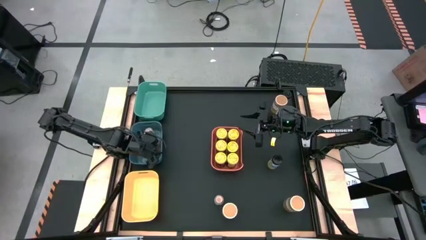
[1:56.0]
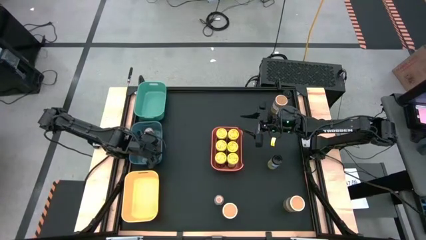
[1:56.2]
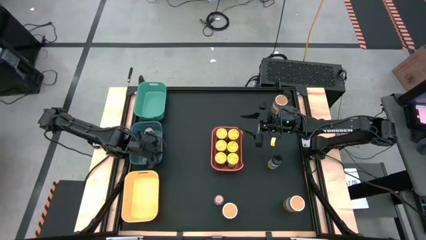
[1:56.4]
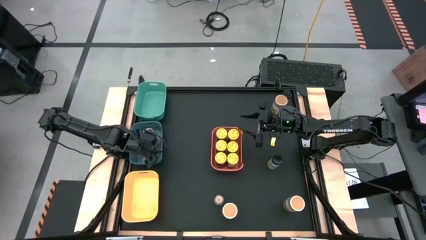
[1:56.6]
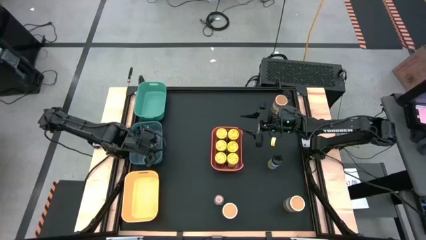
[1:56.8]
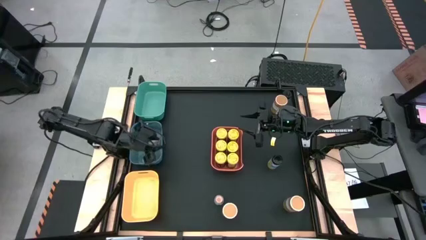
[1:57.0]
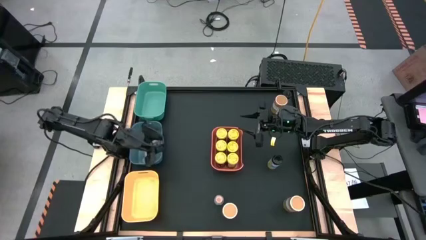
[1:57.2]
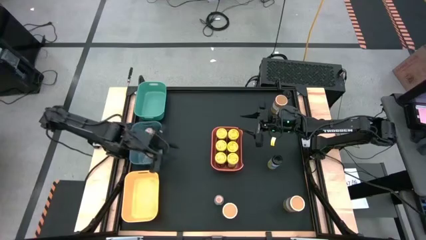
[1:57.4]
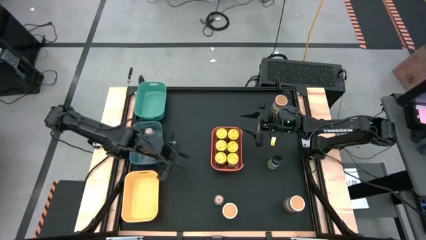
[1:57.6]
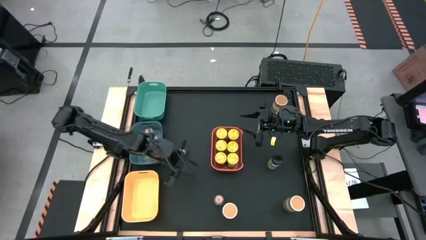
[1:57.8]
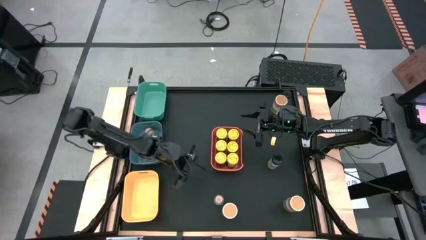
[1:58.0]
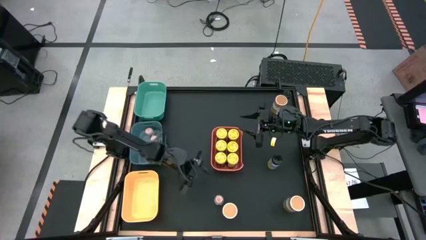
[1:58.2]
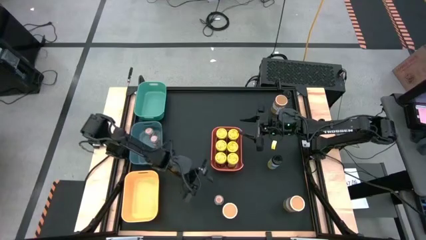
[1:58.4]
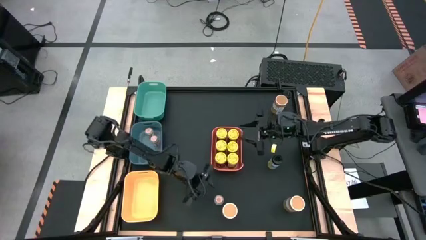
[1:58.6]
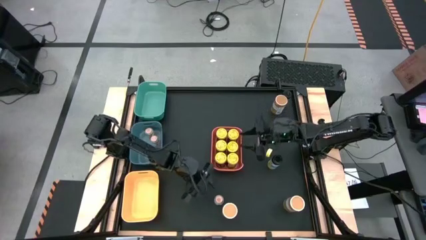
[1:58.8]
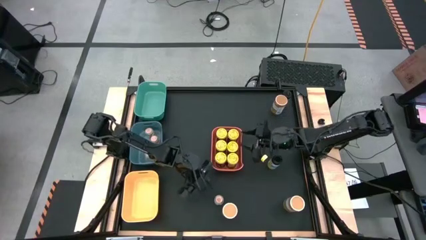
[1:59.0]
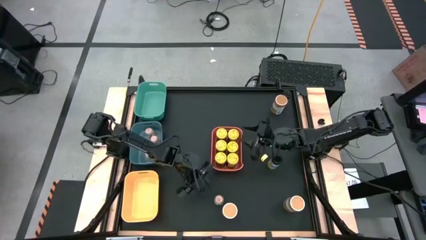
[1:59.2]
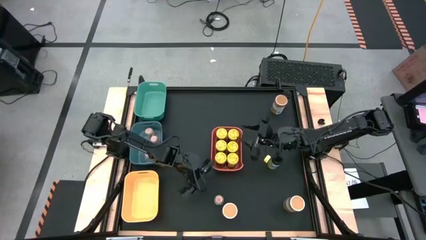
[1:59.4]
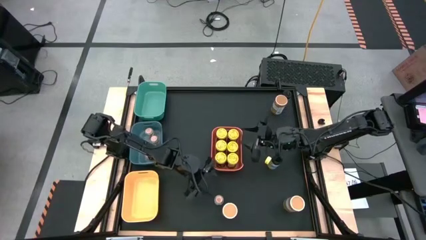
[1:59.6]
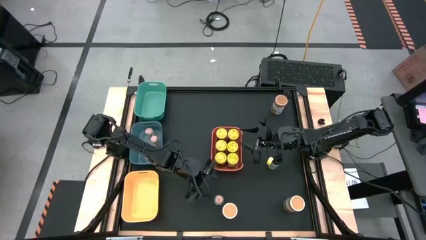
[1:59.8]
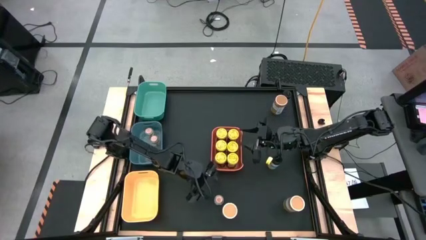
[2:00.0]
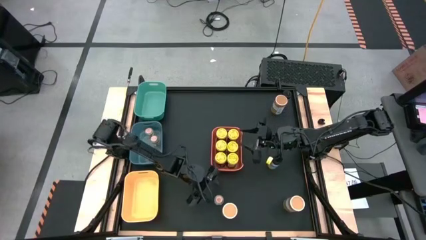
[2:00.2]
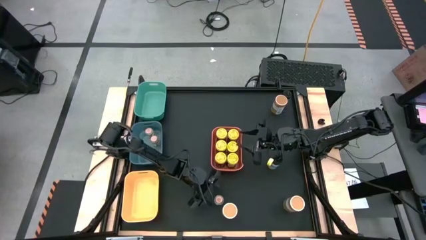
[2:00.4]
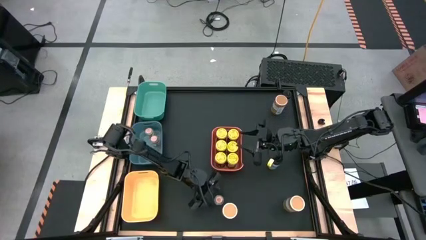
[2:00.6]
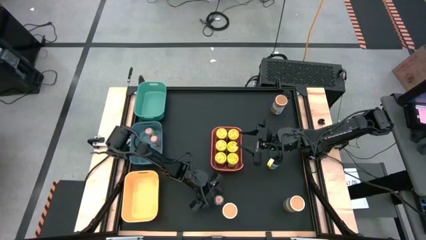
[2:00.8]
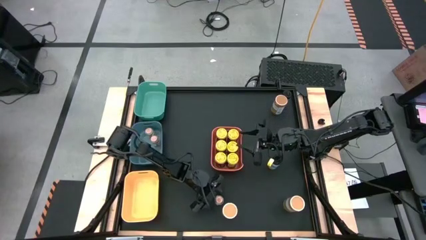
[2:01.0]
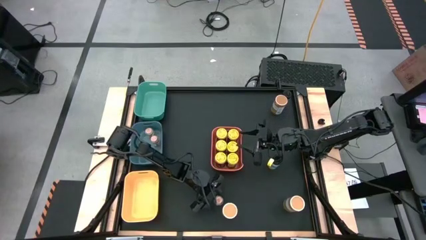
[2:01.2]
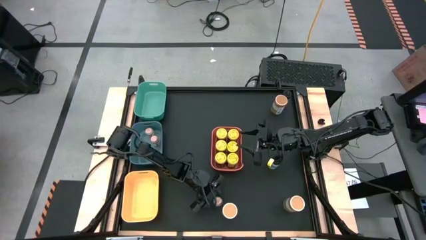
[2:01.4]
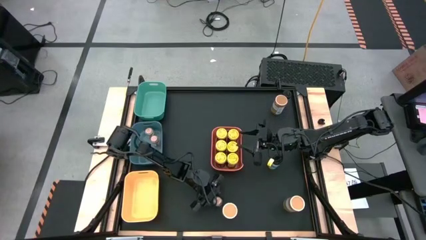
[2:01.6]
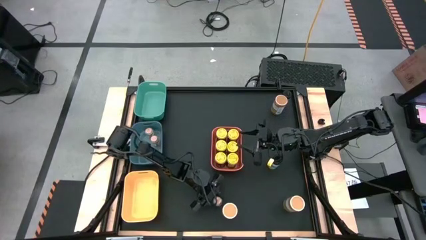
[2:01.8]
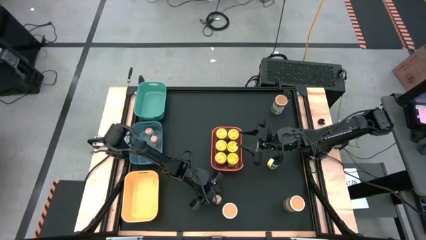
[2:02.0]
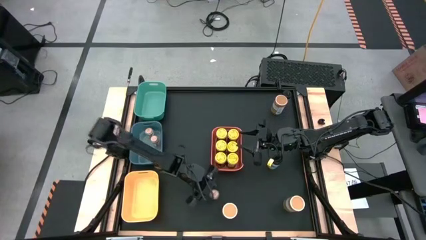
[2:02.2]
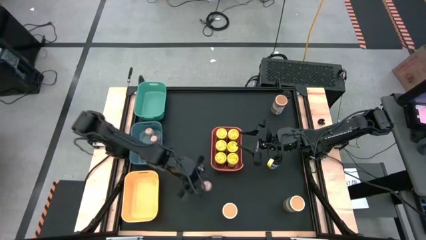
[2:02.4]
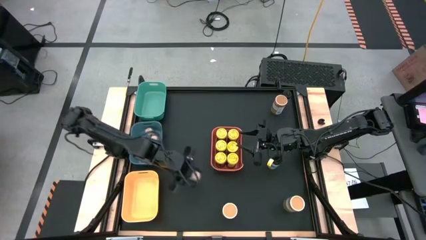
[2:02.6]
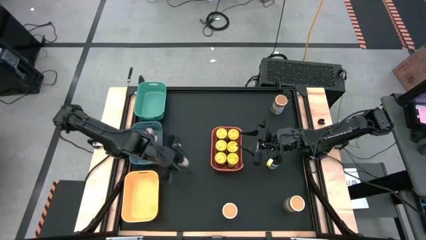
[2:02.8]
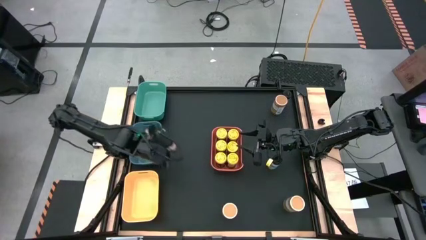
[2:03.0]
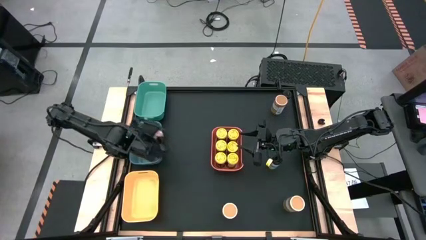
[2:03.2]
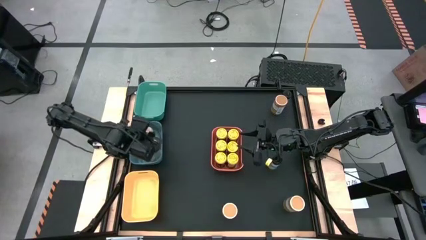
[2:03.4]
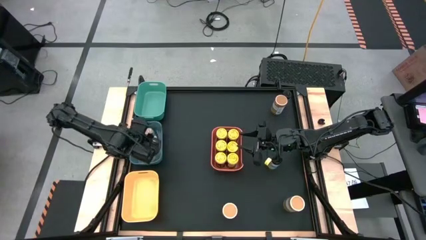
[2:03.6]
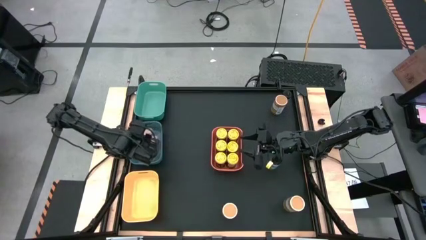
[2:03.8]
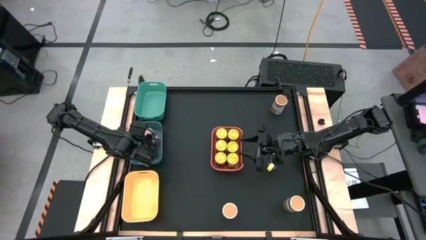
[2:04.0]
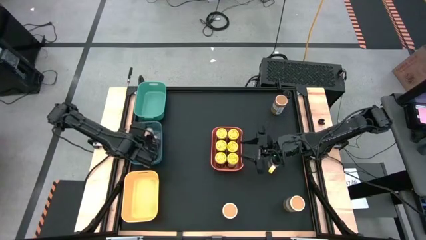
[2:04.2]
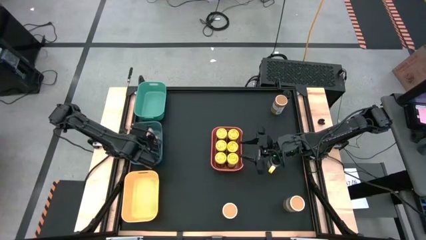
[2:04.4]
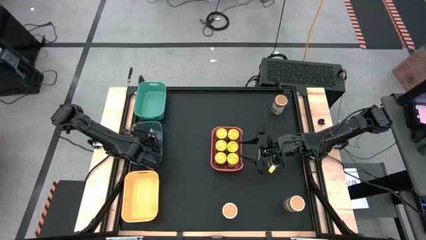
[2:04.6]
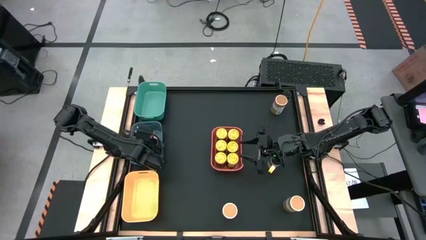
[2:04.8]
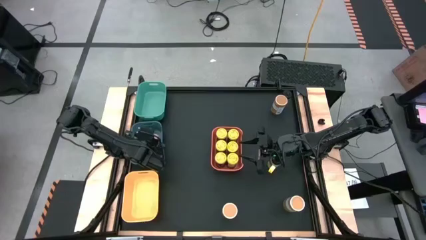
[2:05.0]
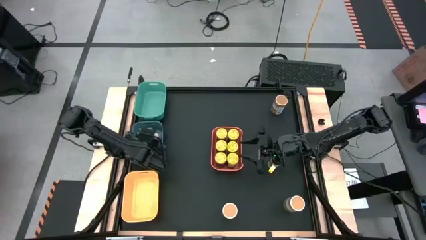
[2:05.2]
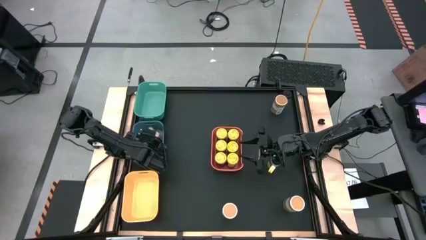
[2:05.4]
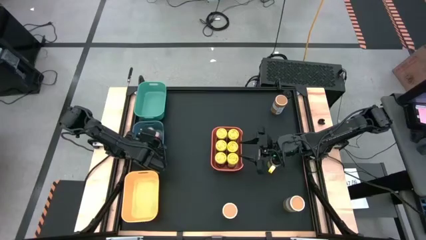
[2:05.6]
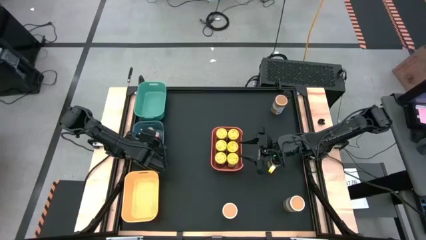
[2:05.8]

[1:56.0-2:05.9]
Task: Sort spices by type
Put the brown seasoning bottle in the blue bin
